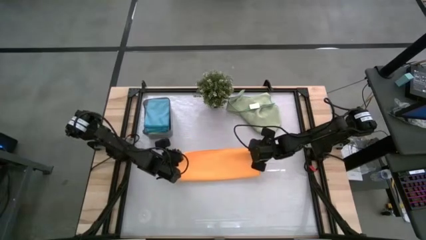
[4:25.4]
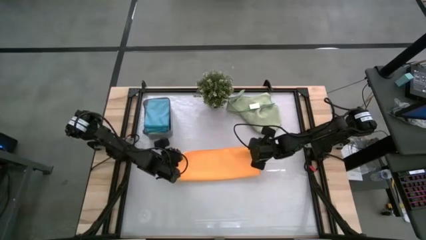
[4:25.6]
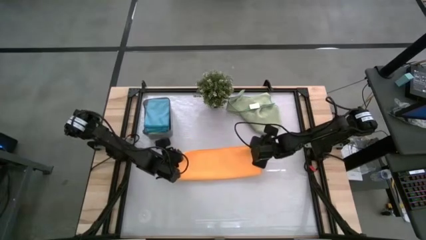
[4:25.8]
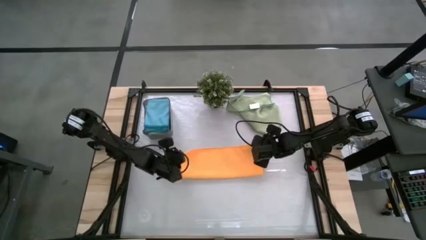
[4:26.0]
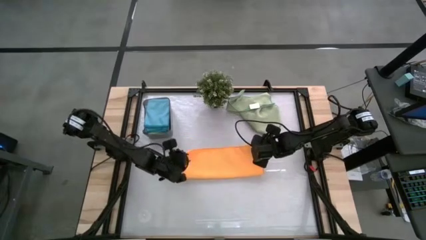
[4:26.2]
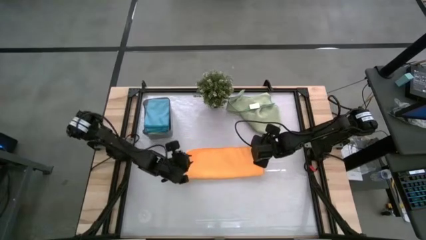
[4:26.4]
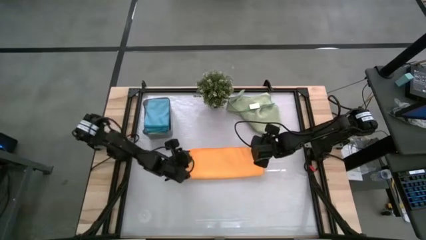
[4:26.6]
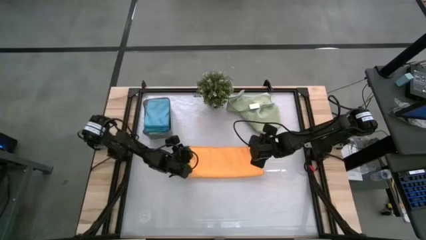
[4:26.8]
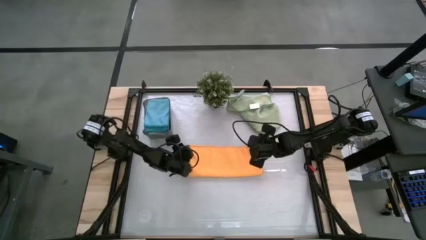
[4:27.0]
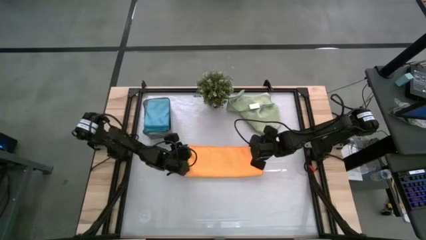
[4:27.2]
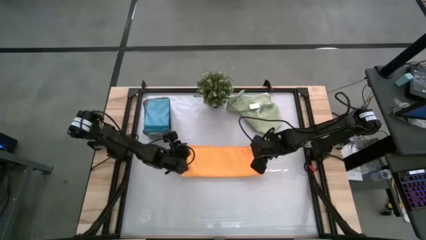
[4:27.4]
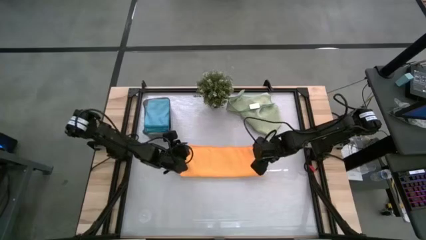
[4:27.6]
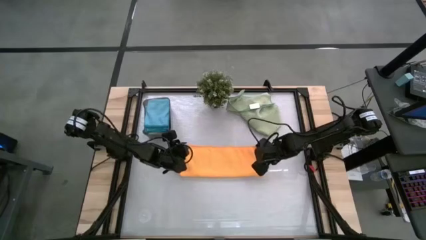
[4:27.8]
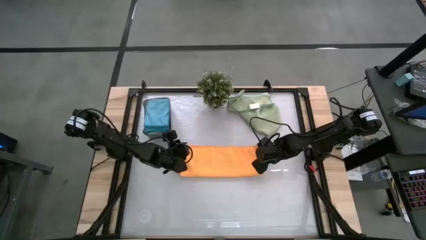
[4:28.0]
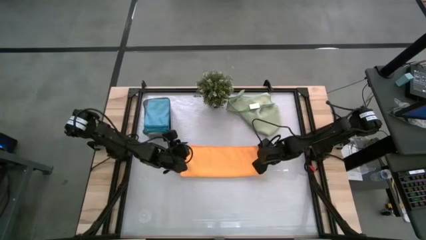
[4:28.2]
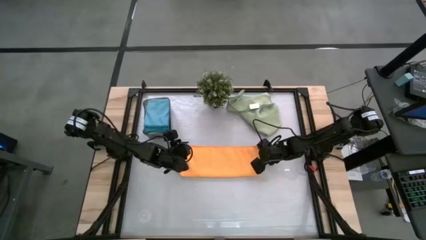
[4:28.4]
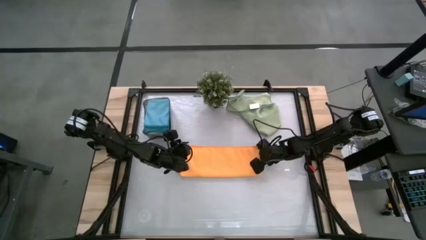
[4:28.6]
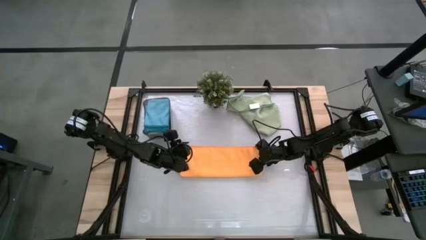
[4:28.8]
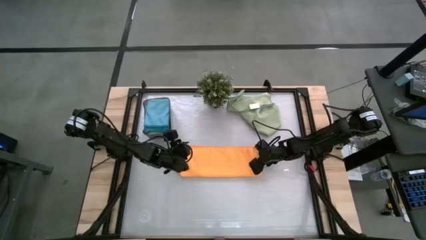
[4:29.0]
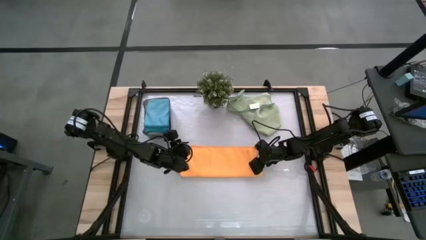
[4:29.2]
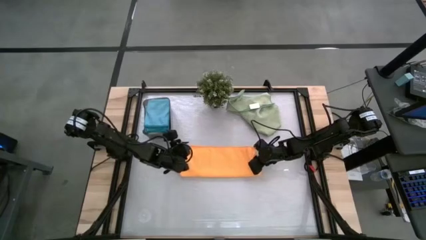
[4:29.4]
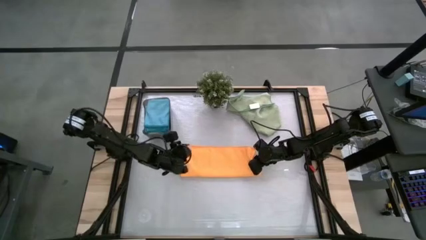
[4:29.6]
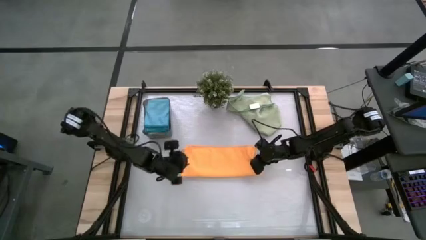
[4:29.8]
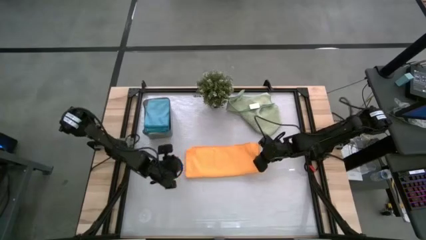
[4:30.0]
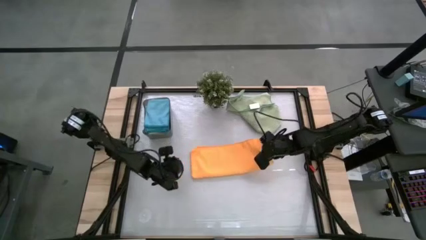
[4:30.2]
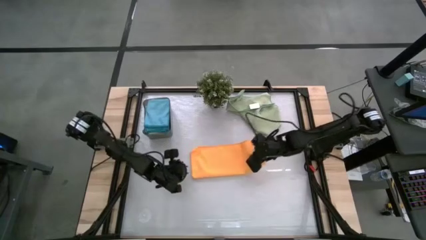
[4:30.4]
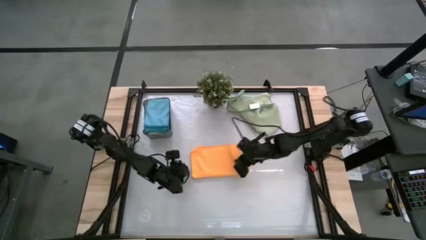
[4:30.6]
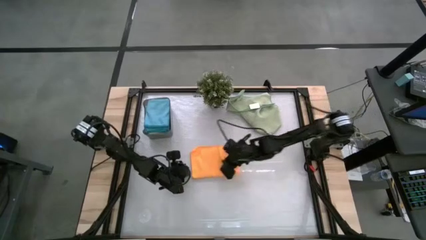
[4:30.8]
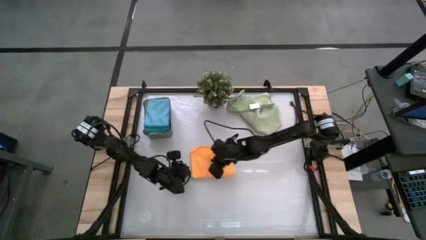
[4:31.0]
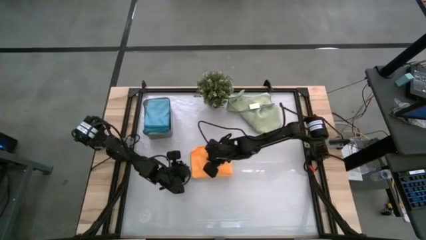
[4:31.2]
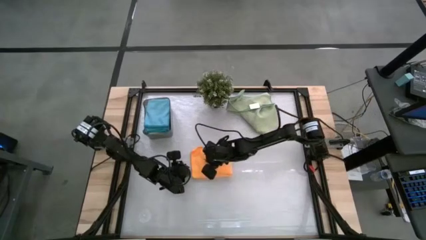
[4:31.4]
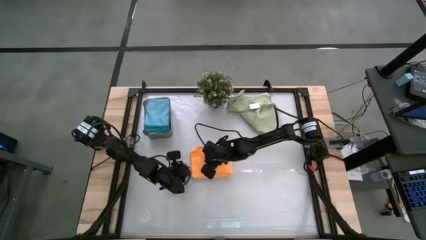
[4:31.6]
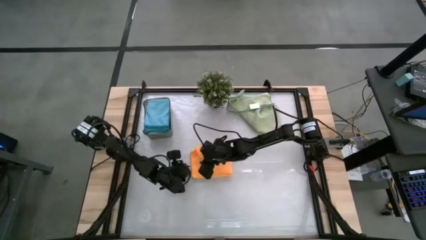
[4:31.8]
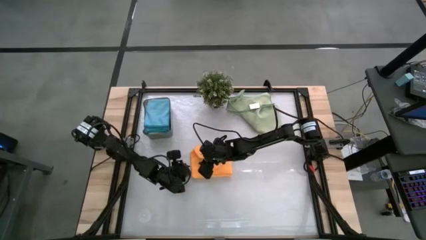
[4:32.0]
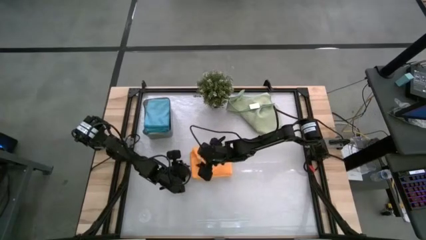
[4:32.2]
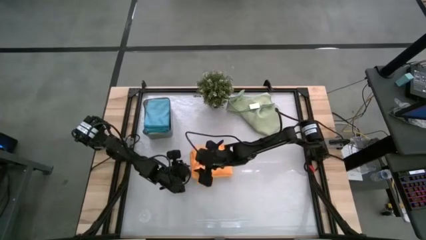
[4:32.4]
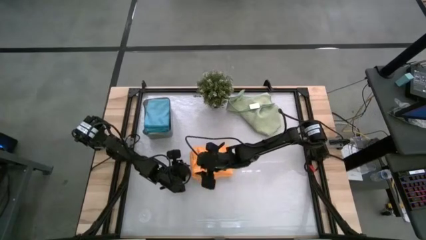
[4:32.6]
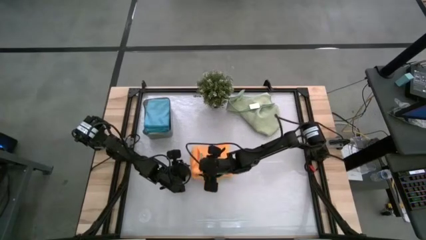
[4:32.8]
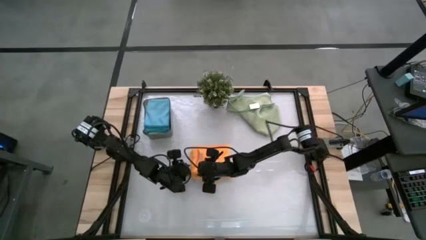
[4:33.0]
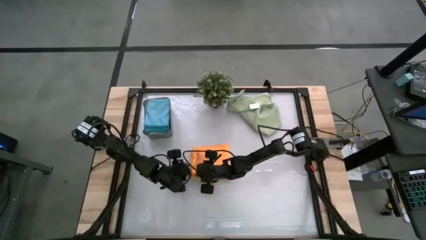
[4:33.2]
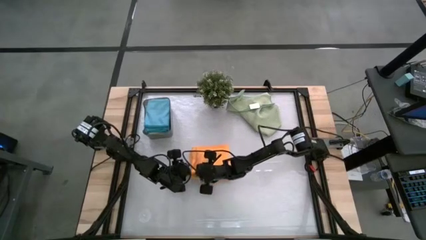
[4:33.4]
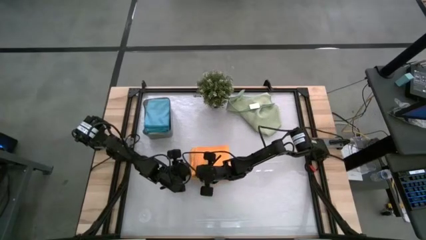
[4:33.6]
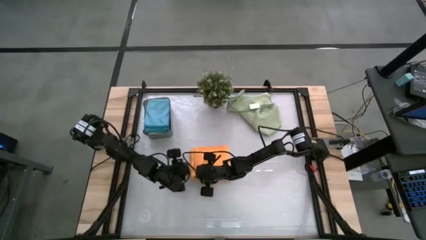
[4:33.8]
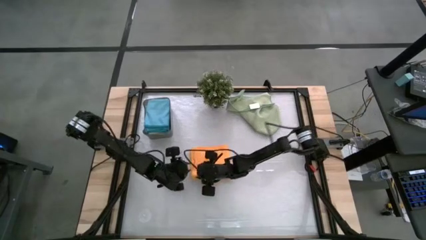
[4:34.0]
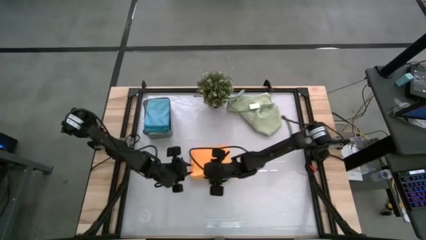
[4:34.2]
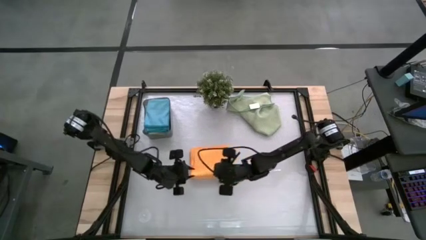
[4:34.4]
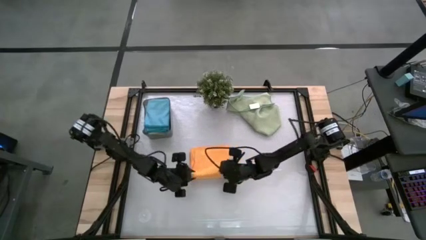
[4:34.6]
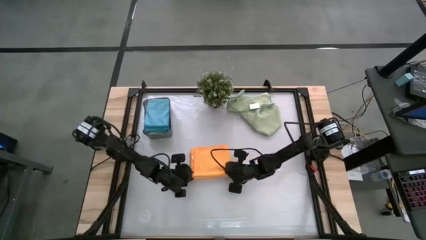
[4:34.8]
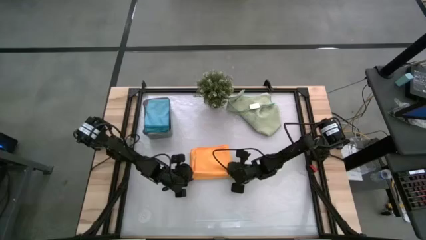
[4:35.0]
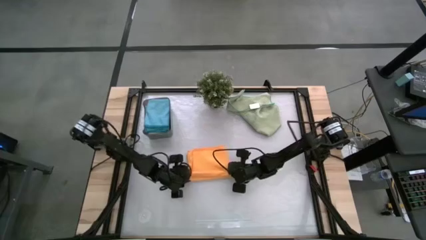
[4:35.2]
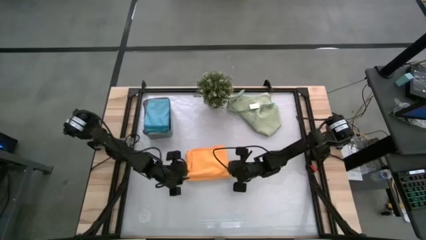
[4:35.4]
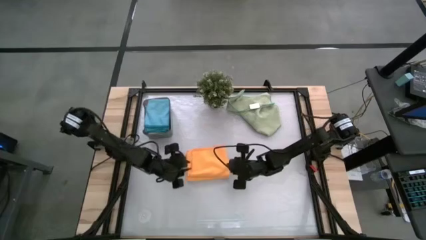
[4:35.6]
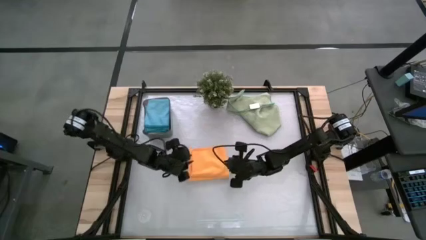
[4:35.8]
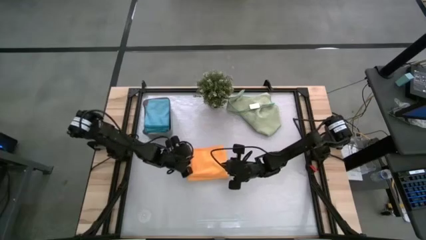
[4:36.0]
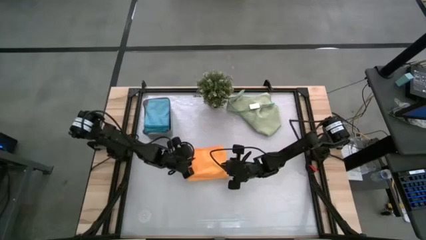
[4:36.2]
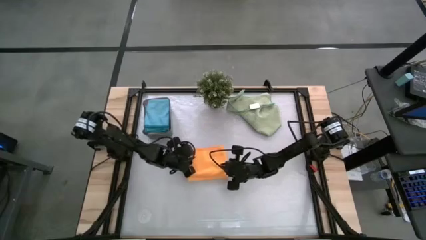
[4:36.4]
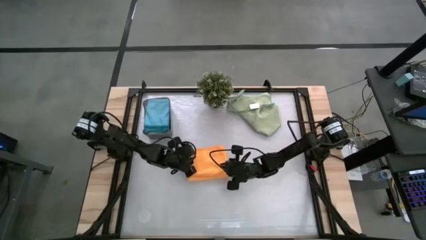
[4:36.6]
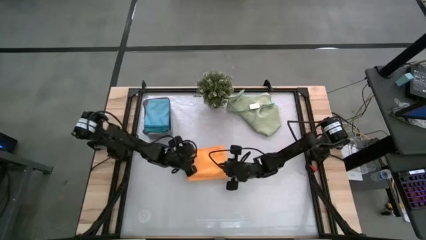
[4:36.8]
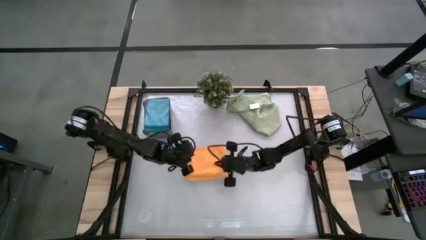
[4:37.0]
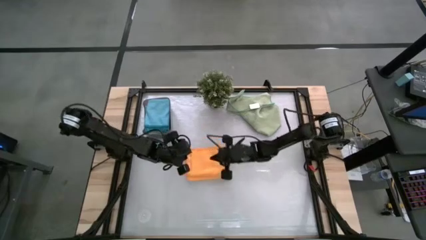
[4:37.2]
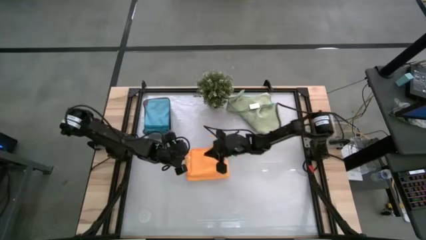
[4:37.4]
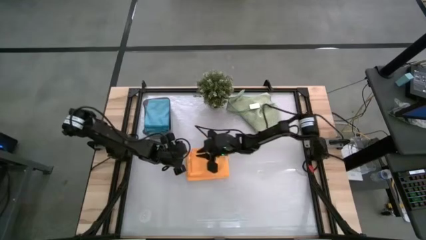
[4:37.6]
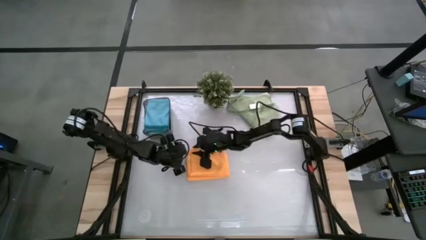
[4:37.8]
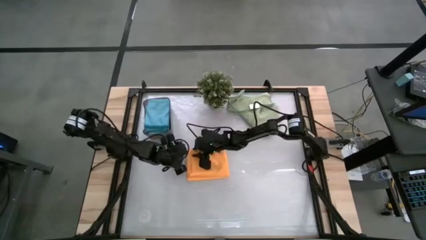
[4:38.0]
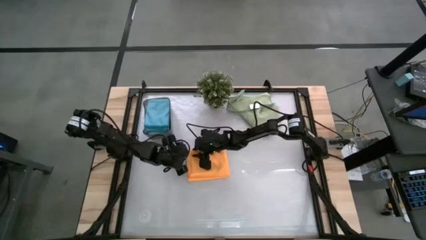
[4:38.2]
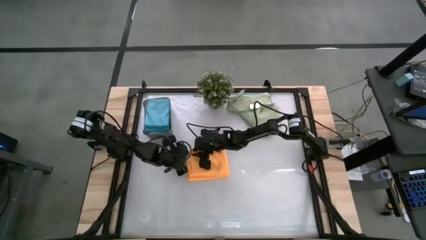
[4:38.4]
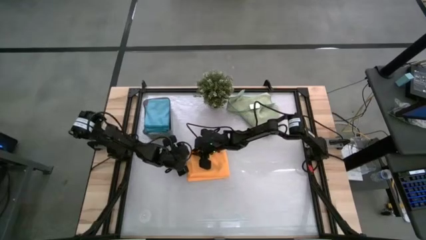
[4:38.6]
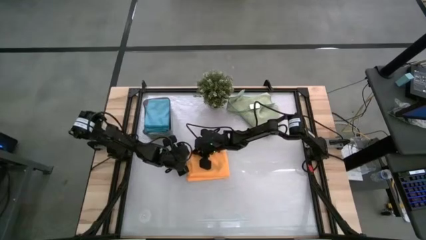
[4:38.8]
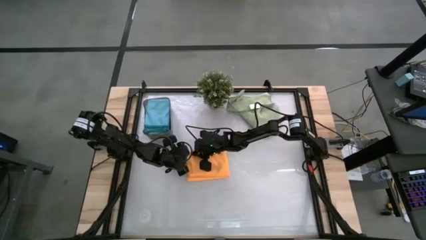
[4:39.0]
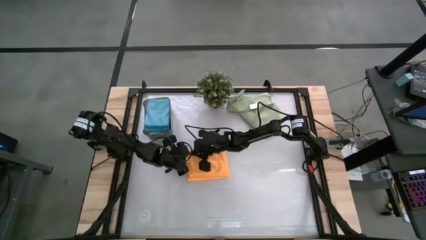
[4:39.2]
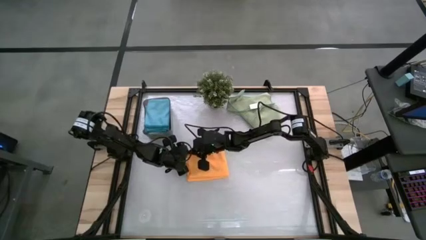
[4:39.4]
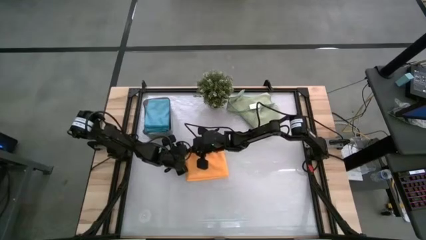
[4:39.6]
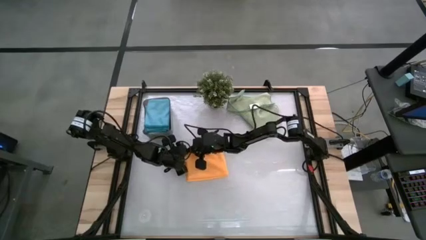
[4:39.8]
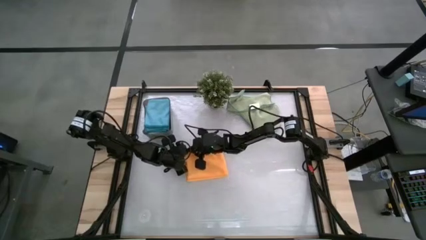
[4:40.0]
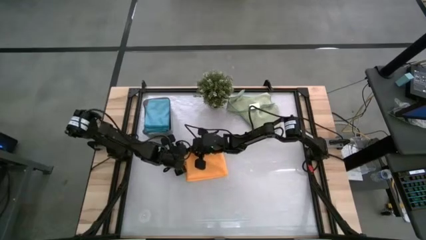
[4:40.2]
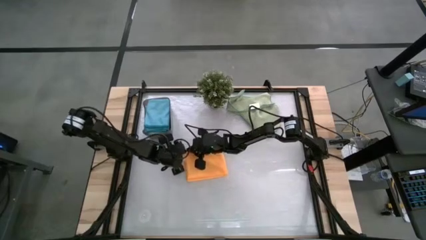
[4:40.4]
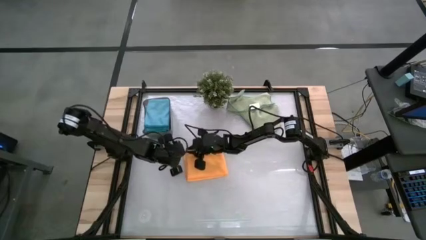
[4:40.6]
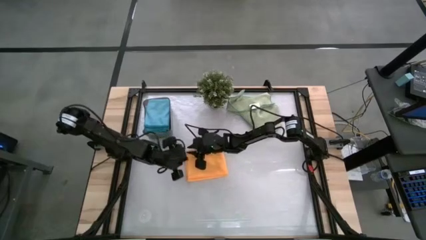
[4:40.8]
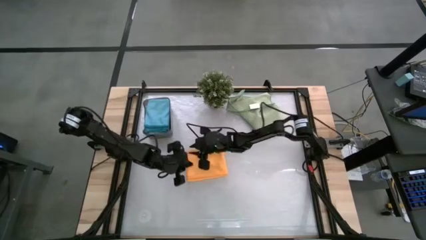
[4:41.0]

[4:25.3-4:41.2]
Task: Fold microfiber towels
Fold the orange microfiber cloth
